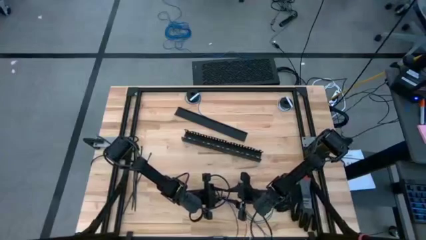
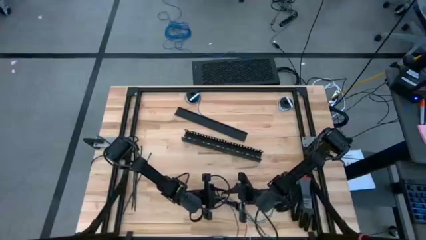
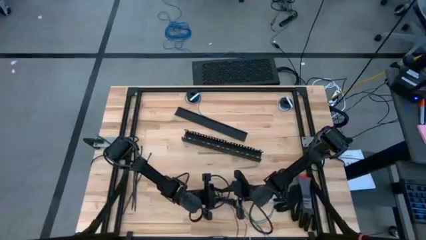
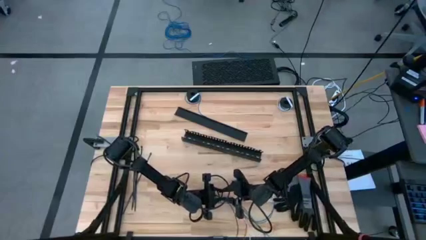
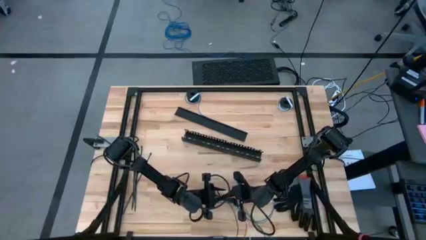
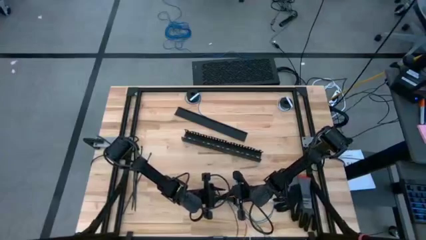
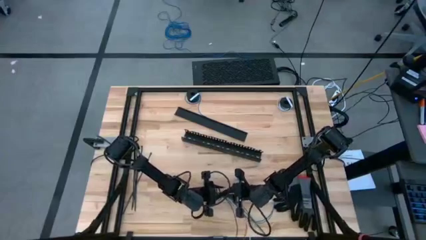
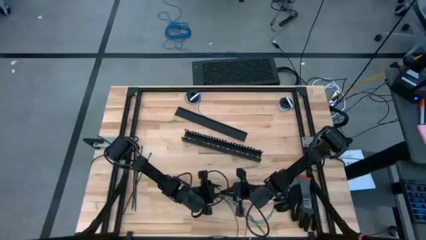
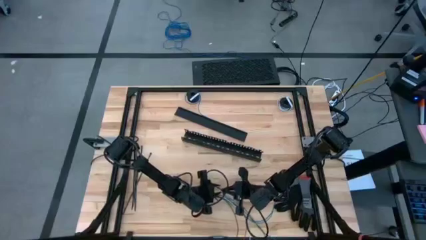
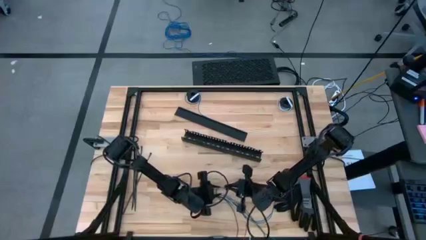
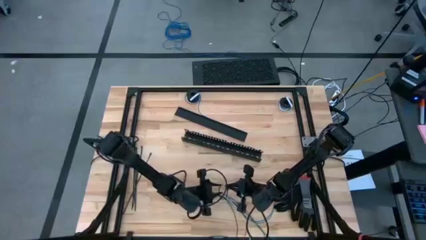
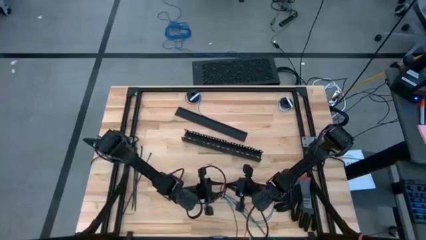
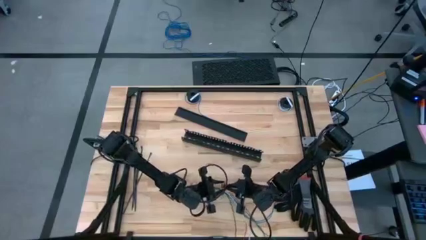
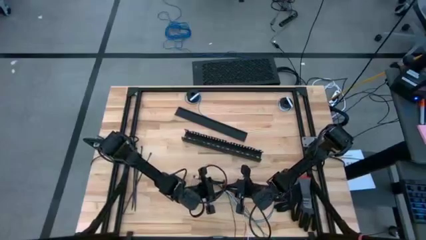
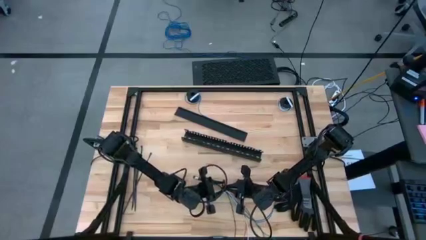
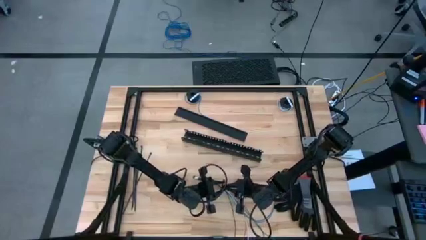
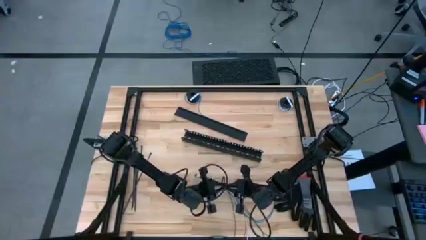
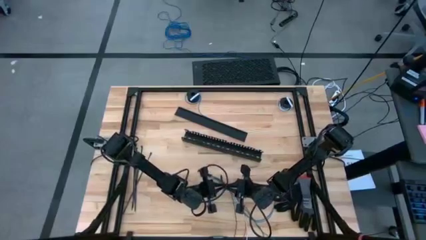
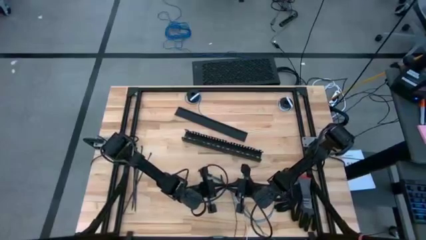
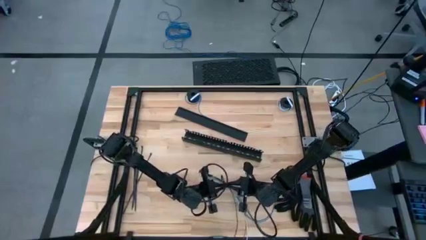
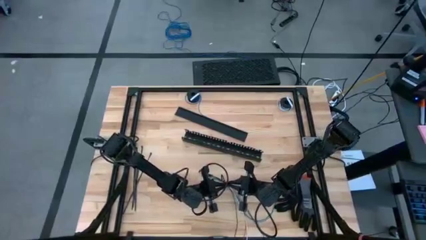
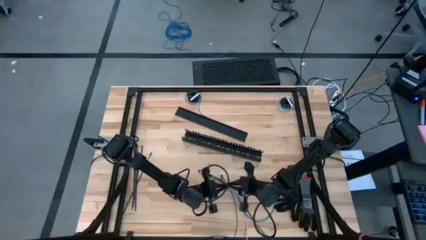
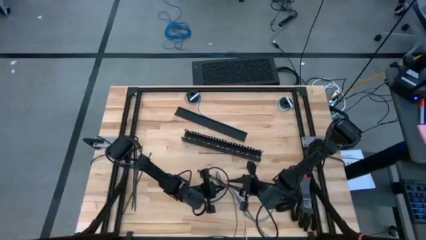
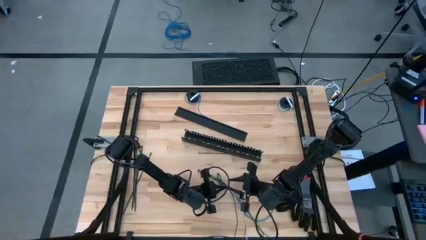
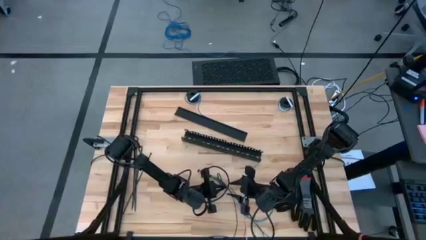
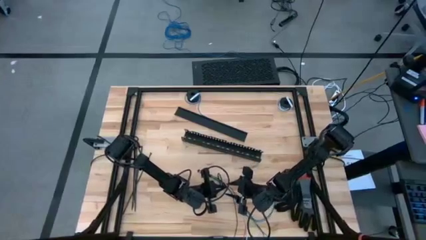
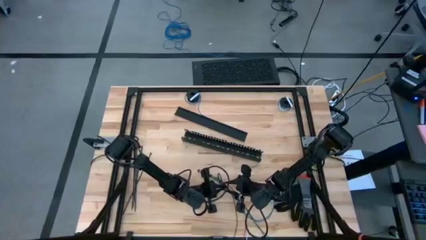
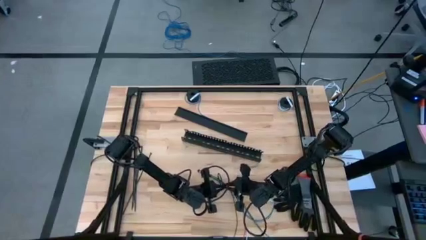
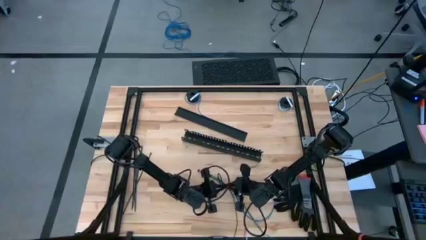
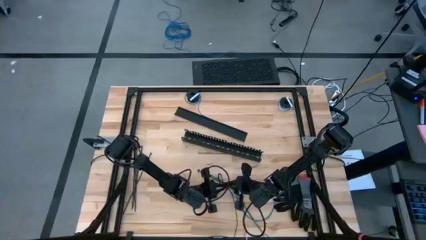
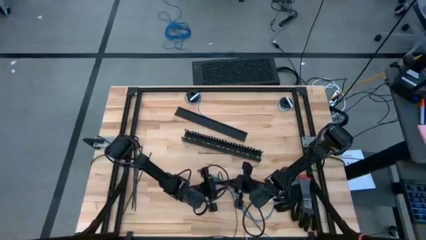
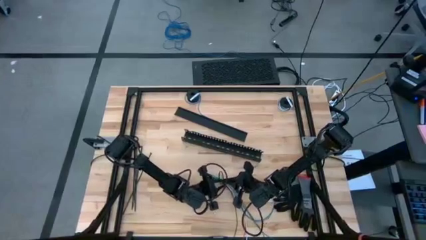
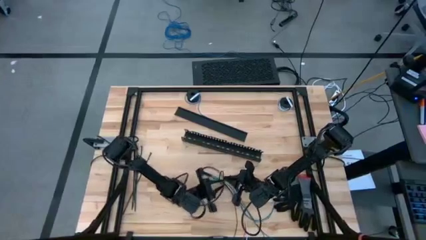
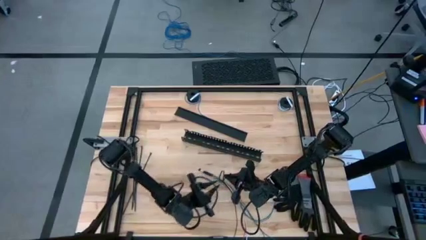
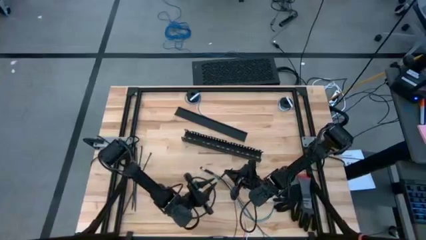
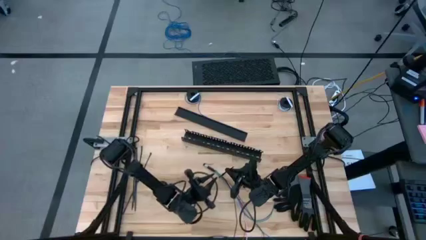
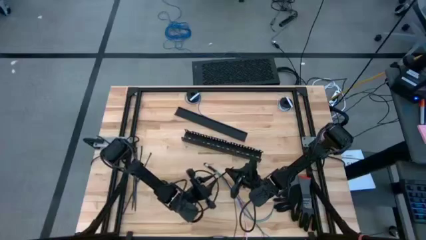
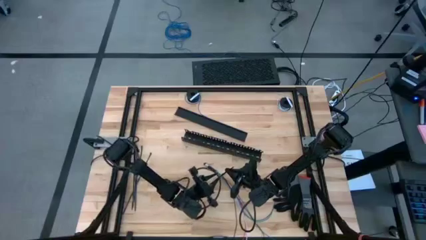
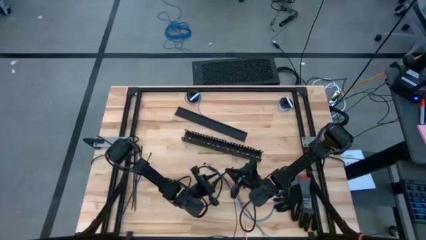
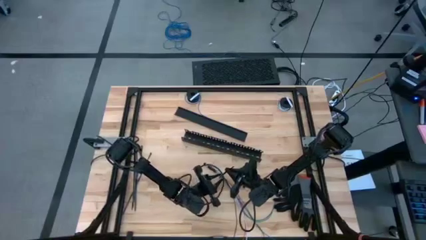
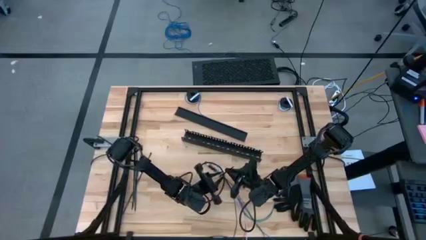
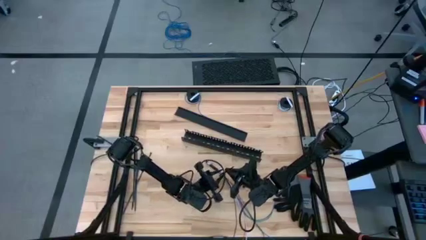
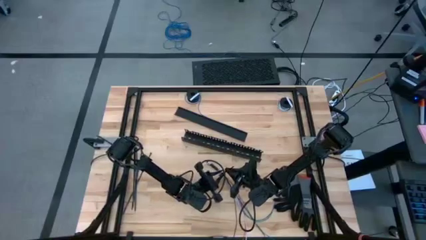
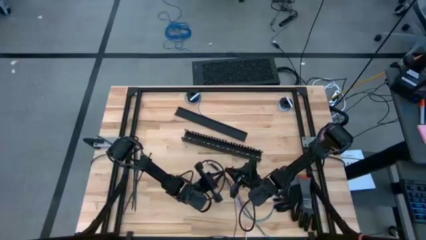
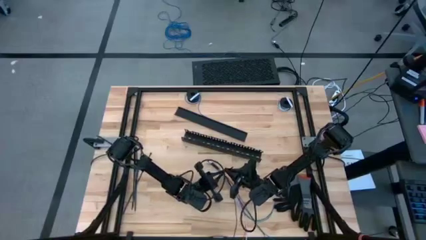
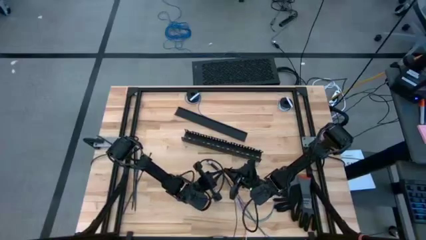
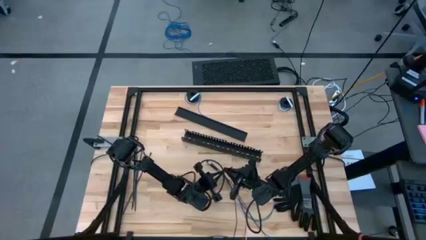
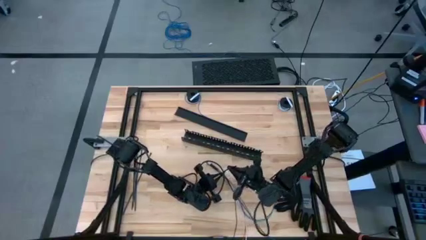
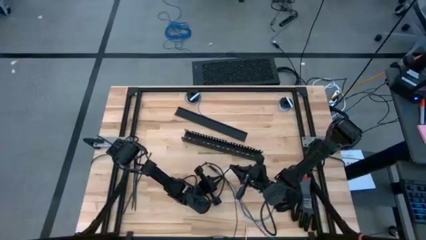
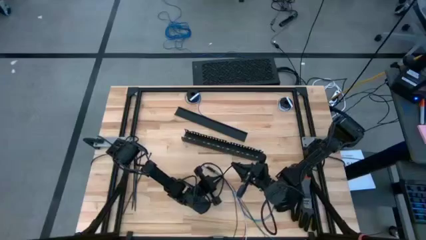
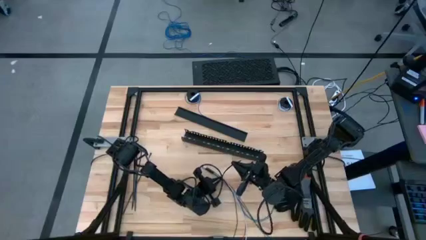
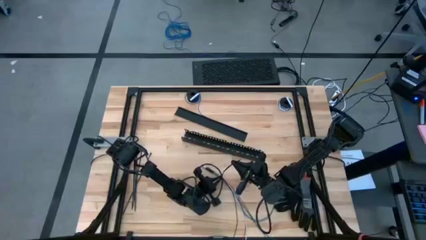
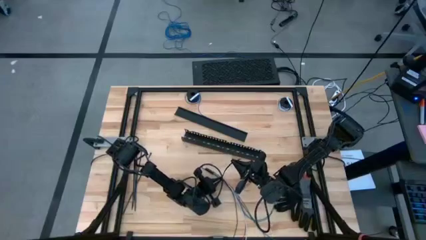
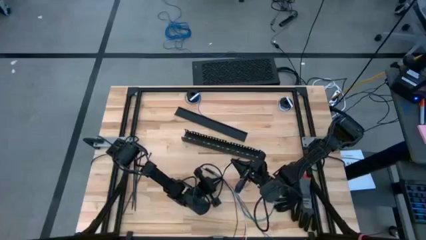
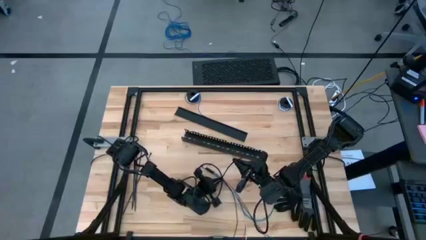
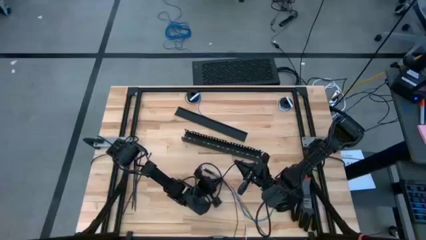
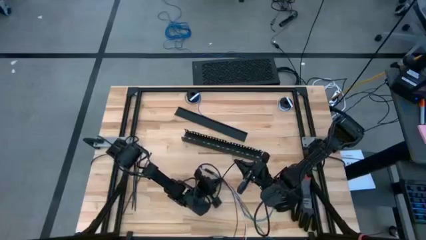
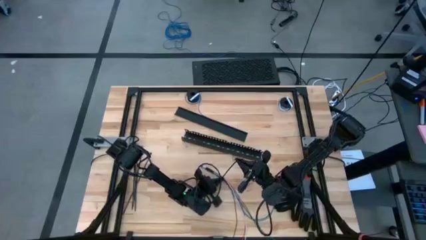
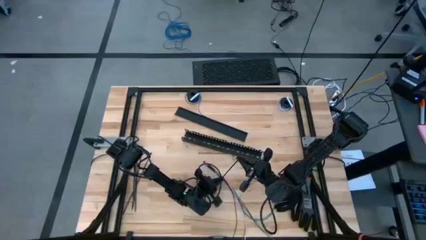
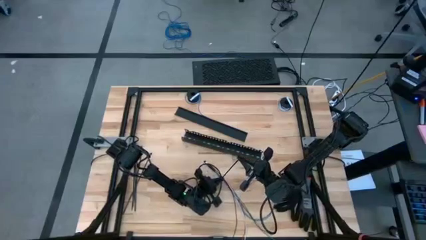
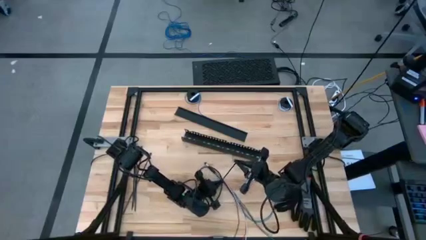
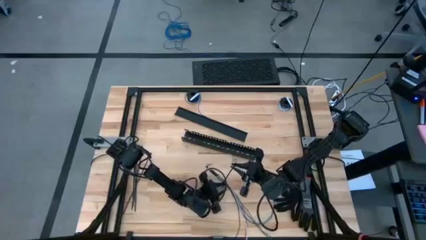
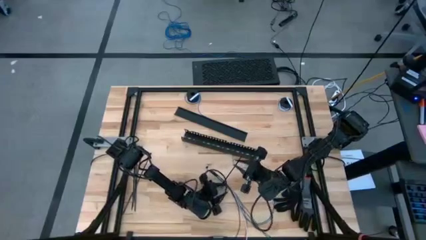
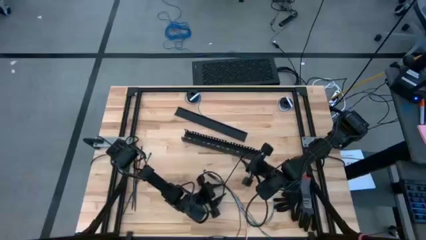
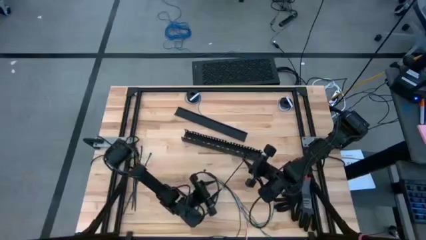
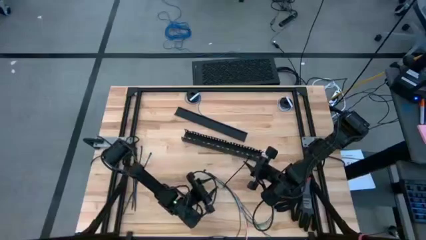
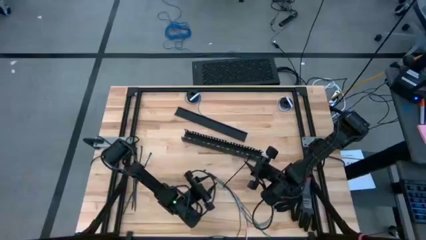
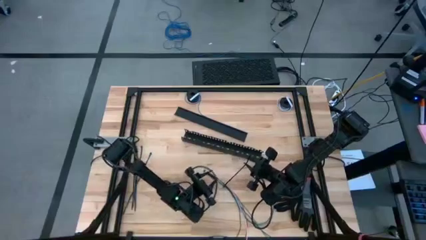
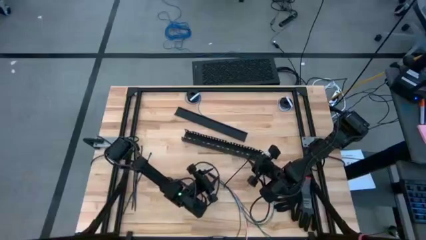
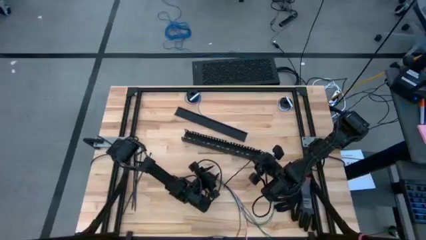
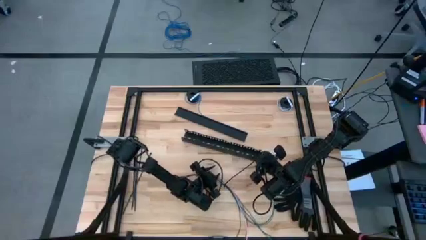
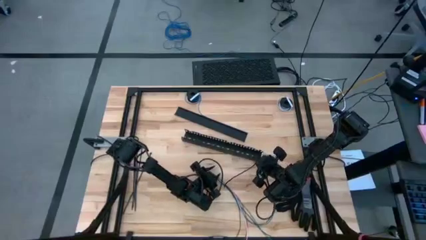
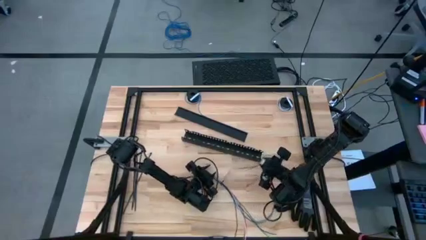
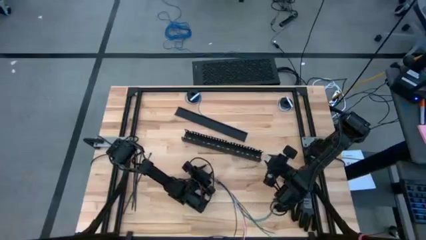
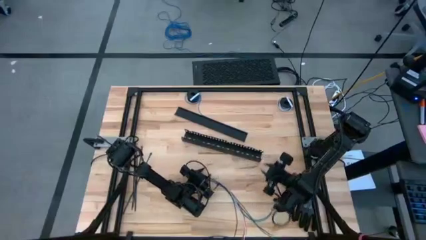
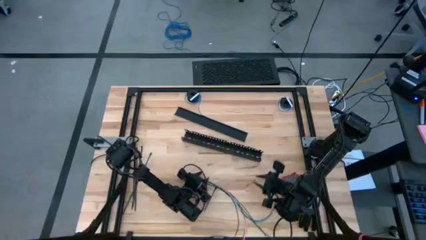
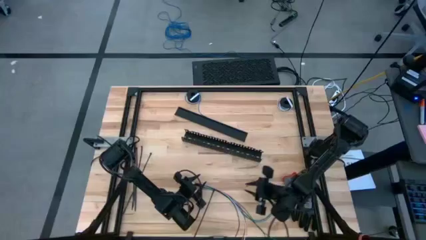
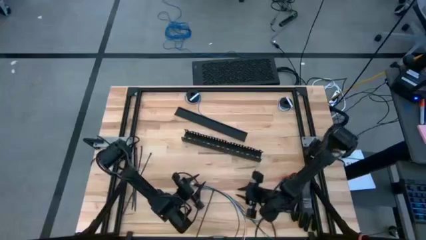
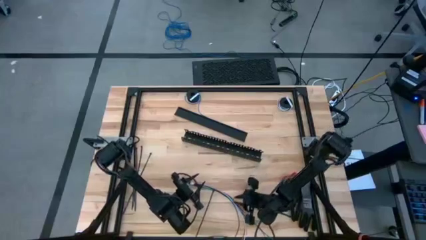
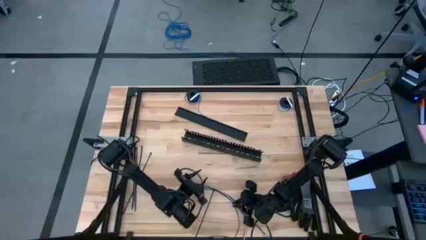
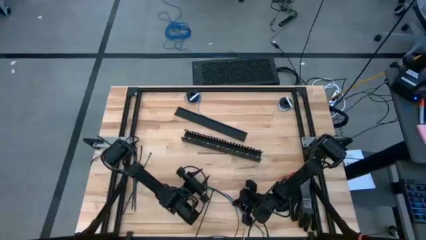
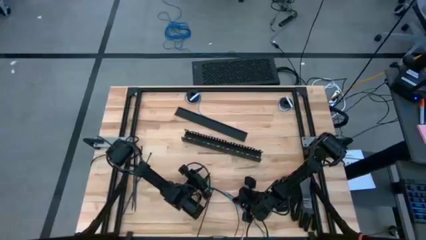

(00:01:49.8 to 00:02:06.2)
Task: Ziptie cables
Wrap the cable wires with the black zip tie
